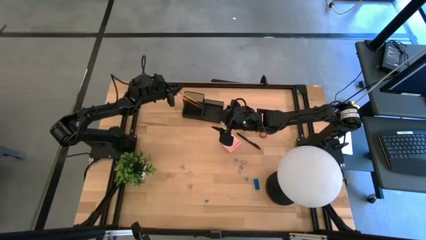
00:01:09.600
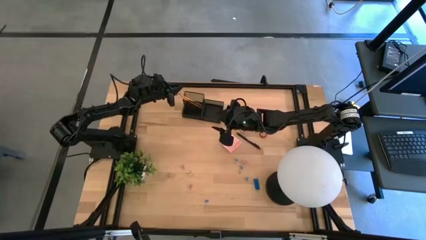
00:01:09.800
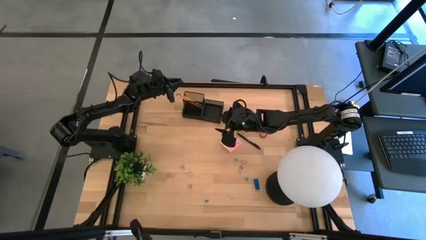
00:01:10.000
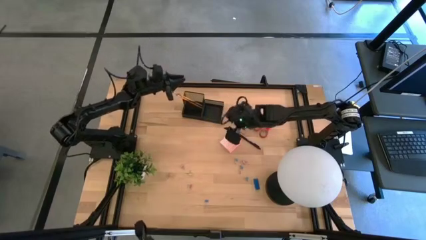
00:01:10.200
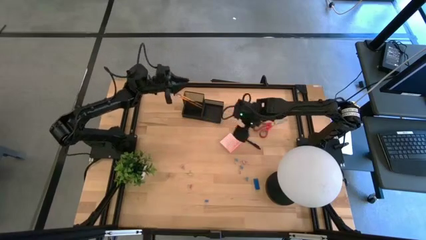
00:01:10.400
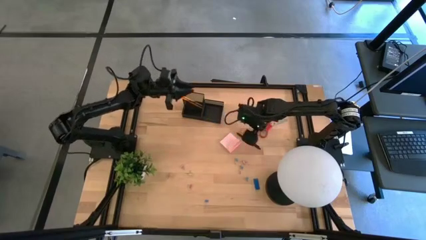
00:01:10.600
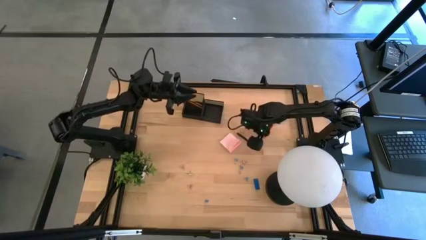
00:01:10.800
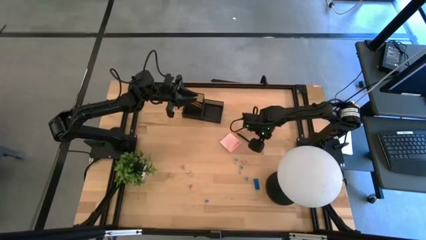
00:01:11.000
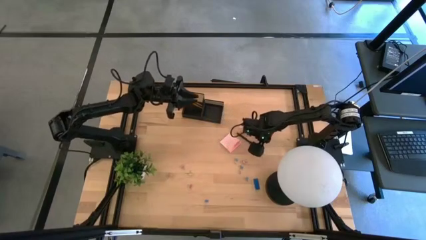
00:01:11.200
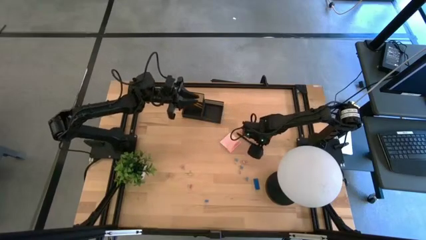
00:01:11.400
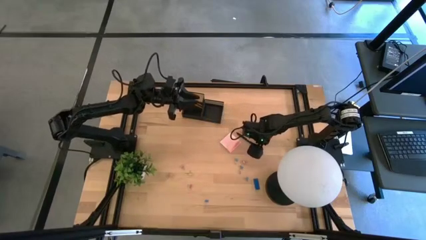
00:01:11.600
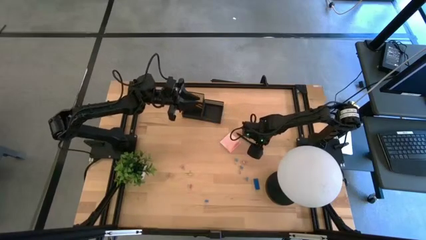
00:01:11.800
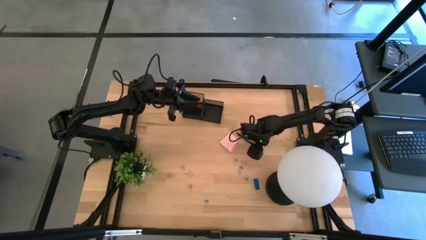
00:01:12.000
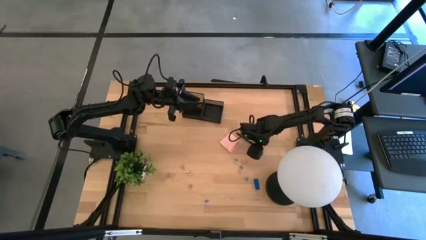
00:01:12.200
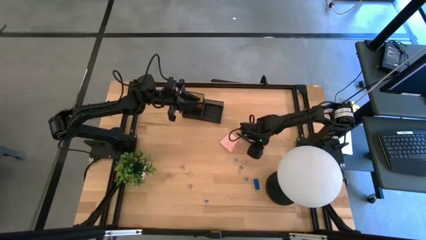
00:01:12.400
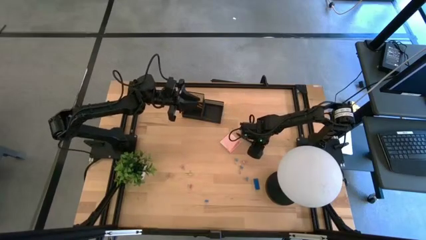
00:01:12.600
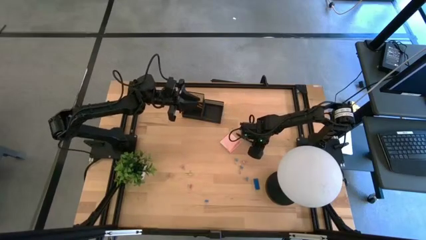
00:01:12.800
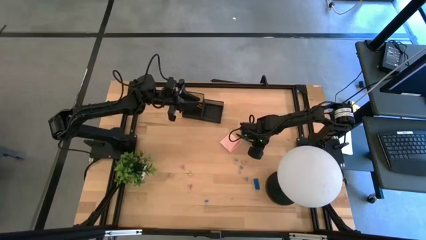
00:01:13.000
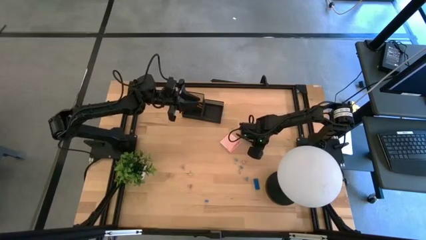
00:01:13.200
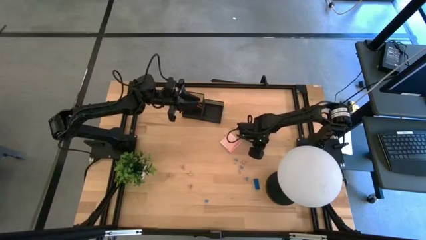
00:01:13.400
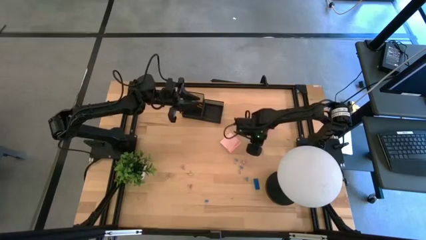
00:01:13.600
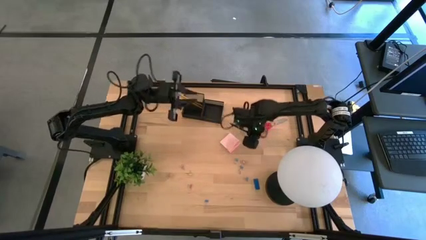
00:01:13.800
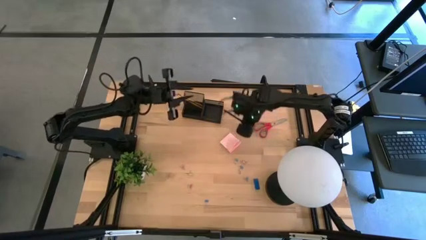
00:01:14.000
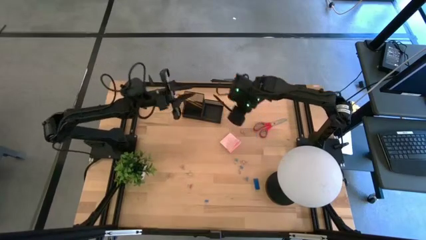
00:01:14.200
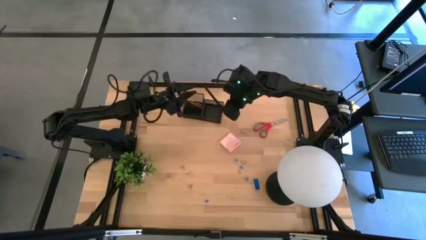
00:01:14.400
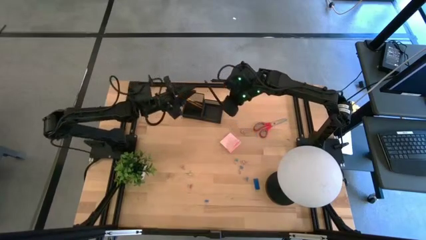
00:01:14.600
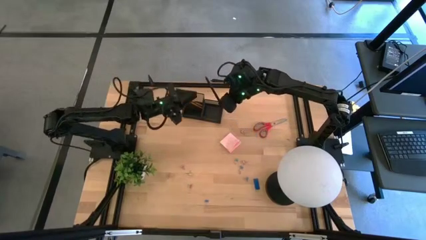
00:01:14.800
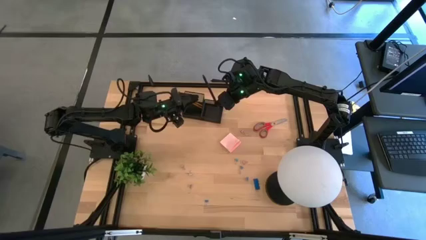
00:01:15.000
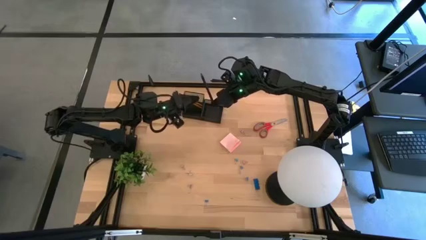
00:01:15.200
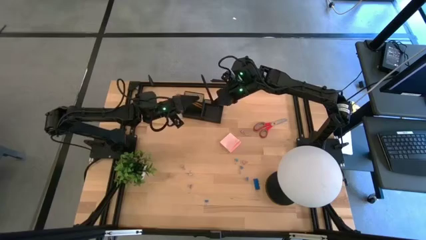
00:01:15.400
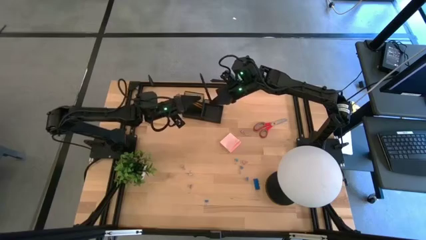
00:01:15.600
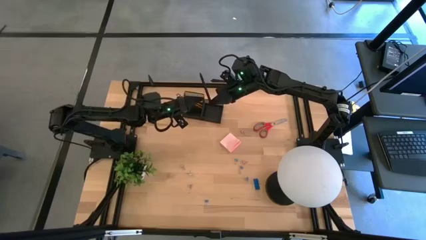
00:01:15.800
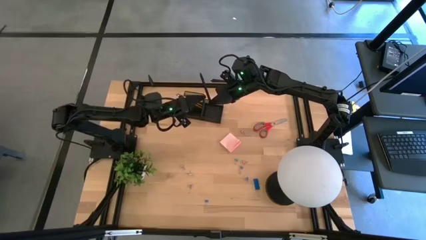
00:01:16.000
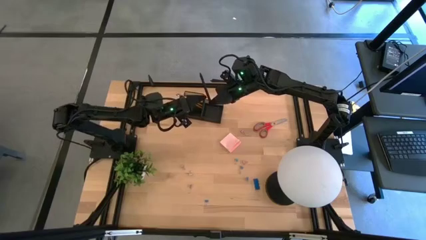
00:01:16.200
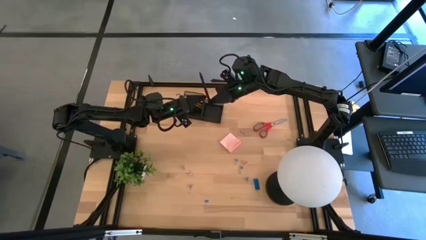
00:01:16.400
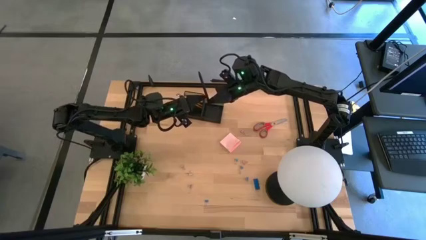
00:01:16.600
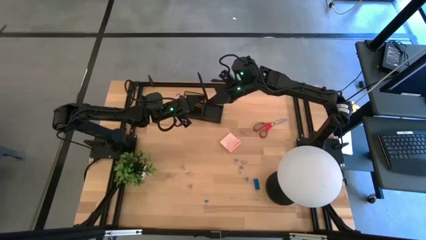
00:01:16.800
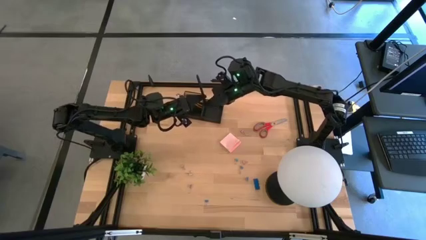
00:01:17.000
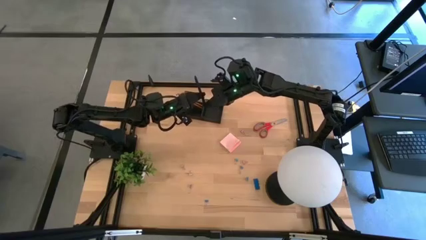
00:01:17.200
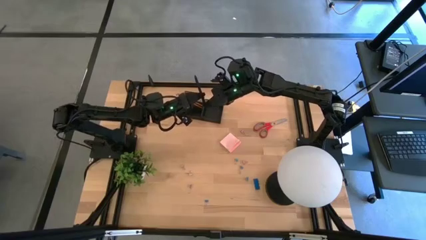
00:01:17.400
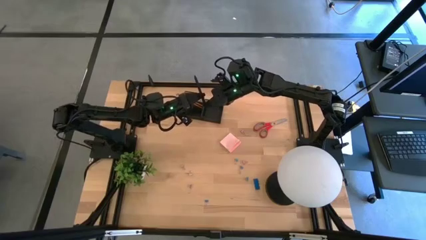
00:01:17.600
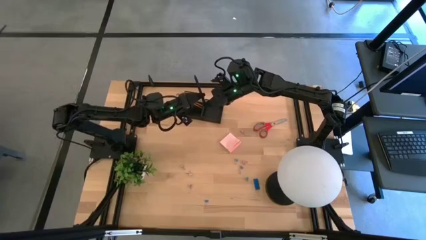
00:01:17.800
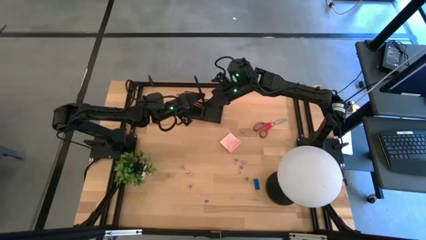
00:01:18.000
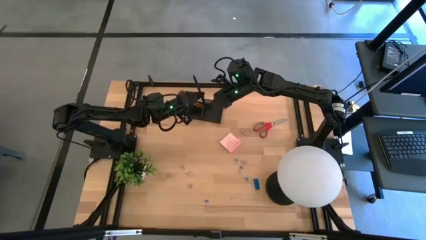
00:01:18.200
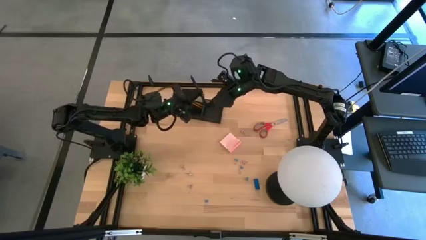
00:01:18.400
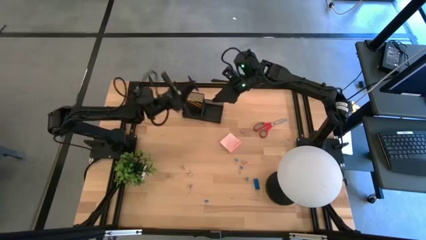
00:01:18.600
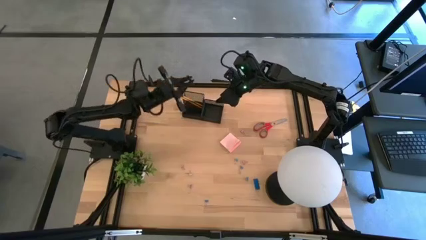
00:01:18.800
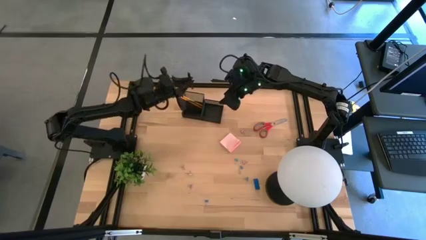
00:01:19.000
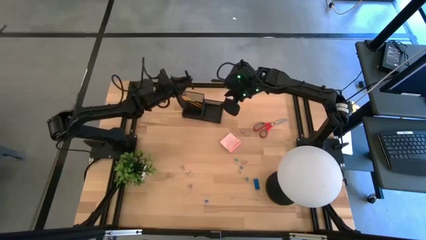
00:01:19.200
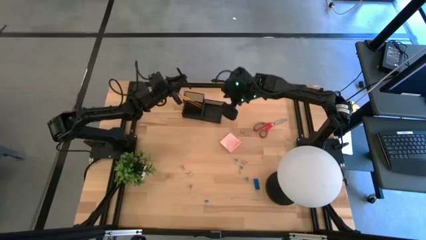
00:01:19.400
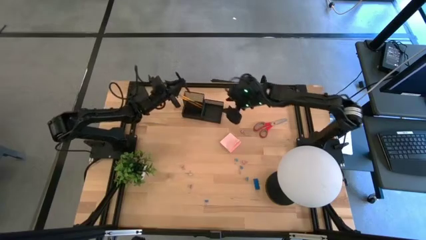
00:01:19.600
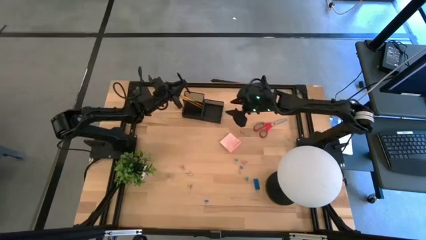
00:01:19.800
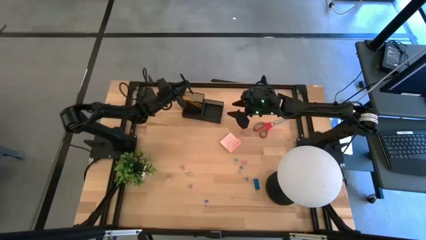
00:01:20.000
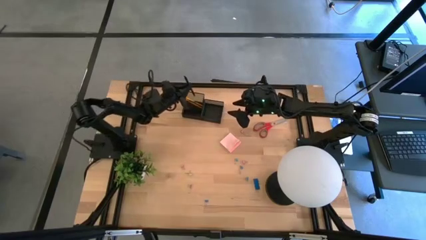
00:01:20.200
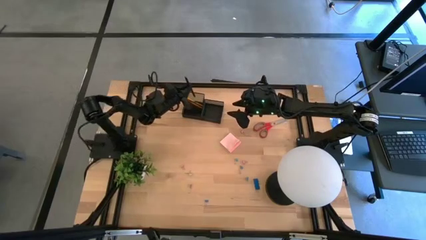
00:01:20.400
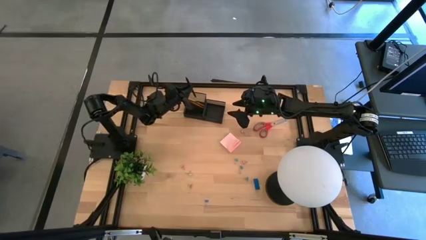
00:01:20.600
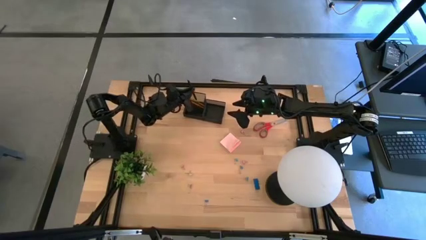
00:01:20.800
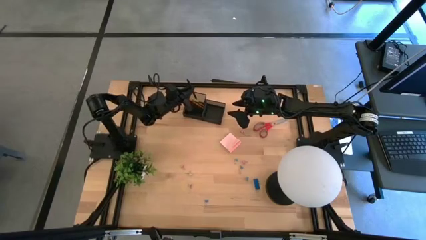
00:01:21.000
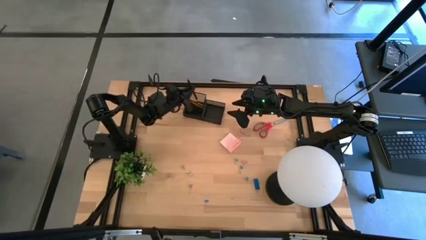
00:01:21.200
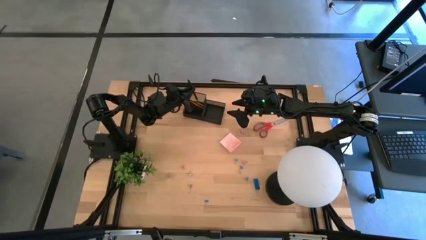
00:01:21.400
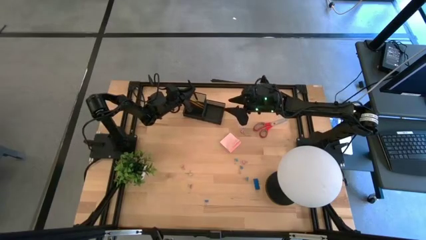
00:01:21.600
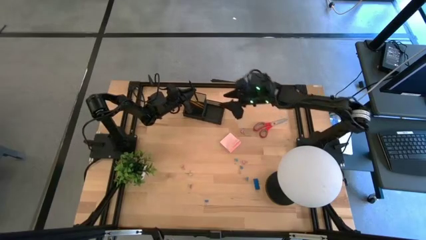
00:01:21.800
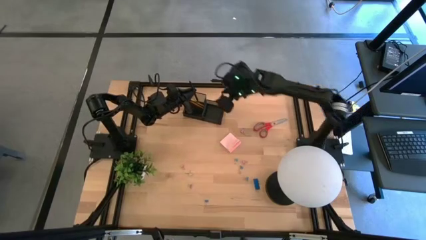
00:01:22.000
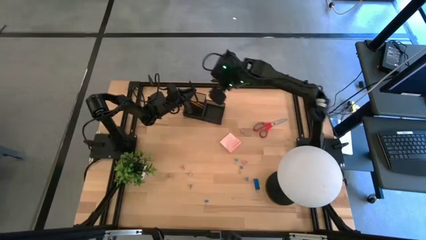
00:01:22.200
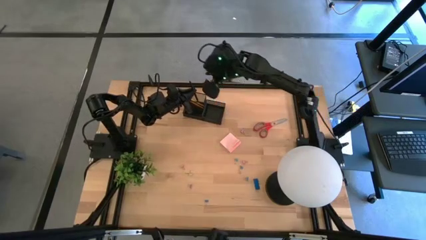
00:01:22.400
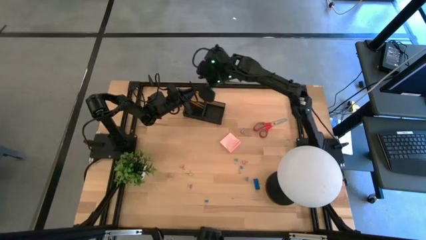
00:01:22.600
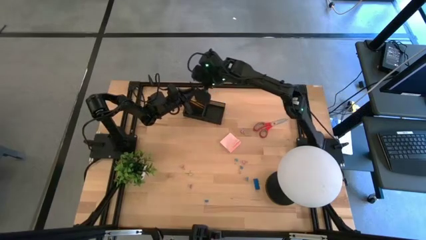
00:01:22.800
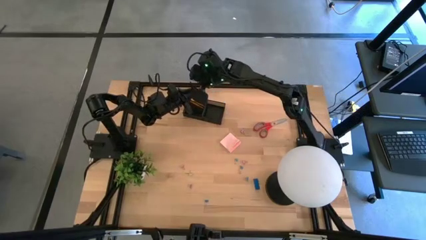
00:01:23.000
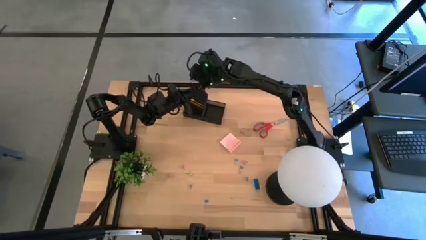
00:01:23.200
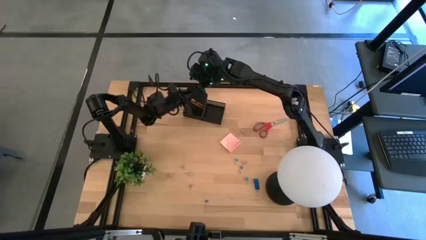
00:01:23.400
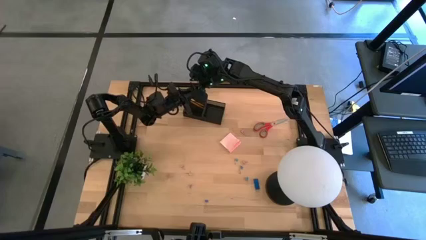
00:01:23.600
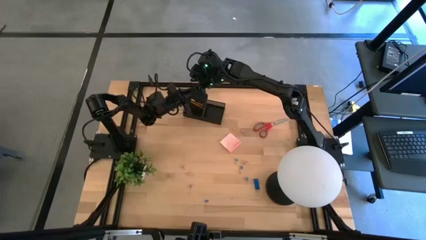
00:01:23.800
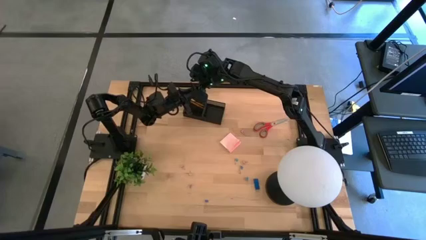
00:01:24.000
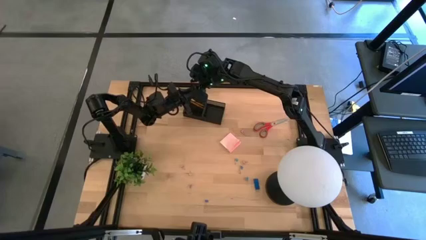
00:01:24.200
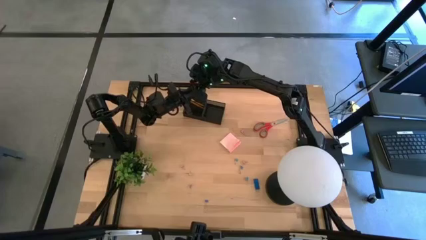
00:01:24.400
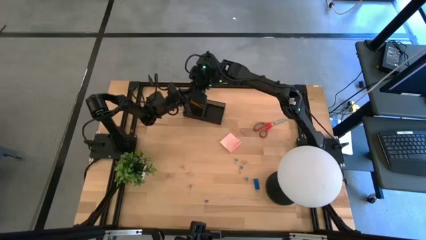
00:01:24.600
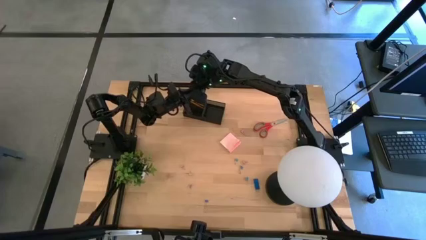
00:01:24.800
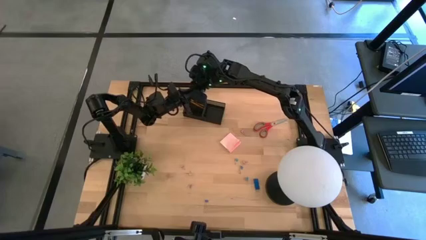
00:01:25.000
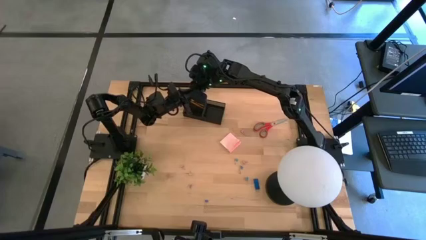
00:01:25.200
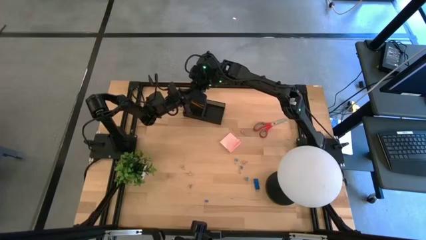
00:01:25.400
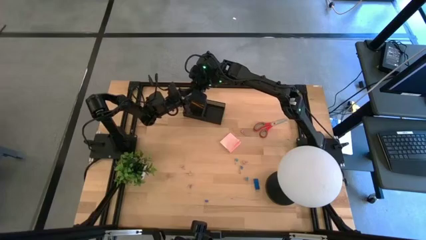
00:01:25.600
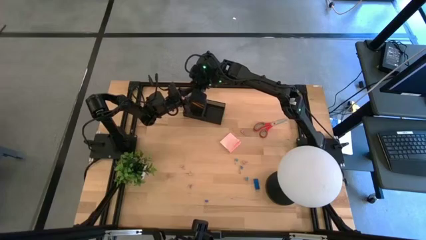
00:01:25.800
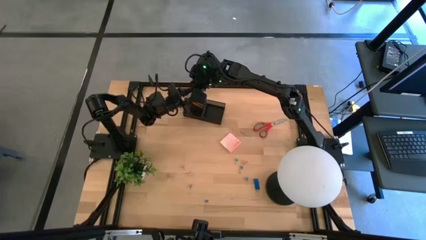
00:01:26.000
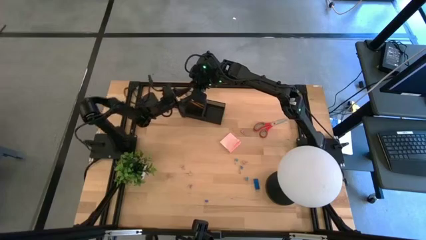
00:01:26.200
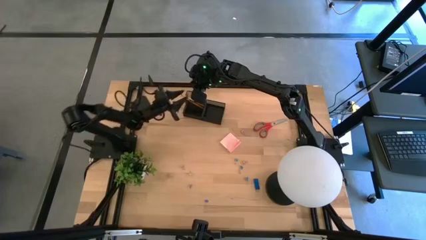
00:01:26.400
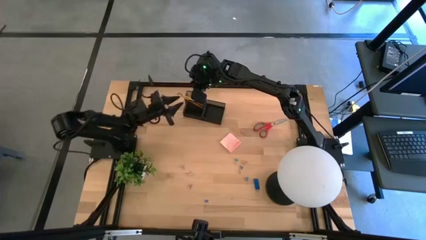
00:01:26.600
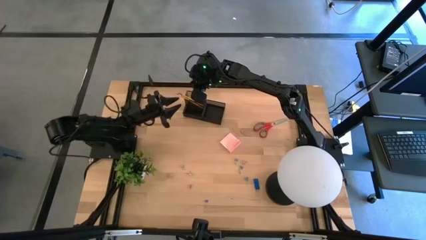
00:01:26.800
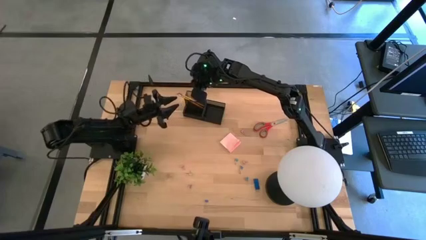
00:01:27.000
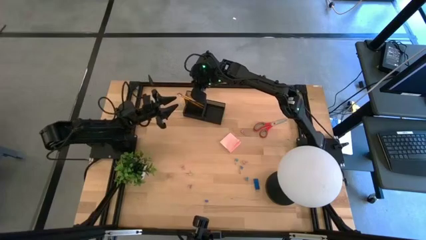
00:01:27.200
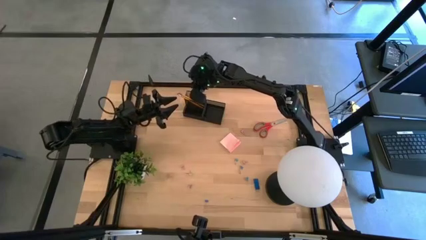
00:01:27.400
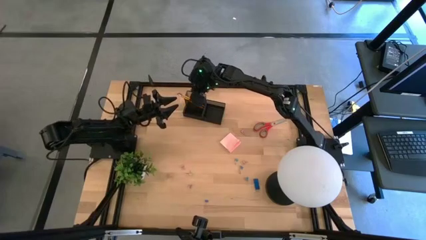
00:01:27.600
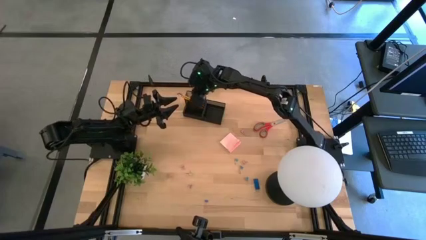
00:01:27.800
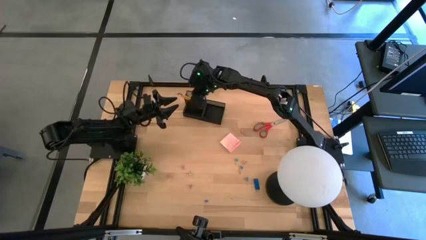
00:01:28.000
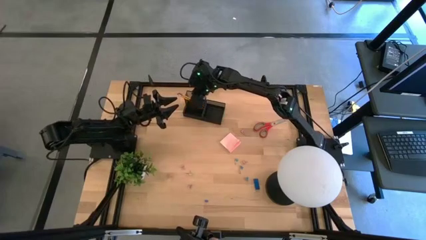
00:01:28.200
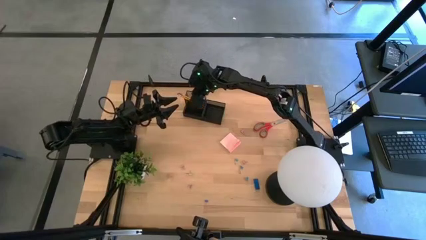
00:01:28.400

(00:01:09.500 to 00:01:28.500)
Task: Pick and place office supplies into organizer
Put the black pen into the black desk organizer
